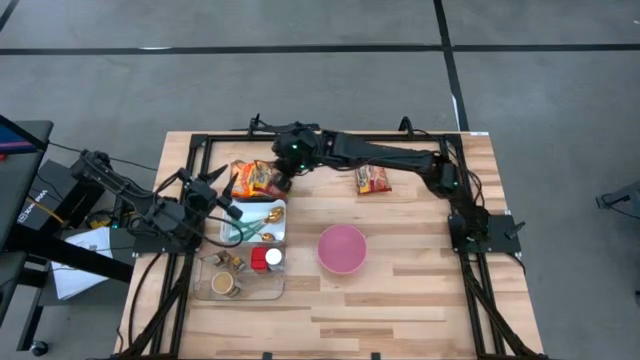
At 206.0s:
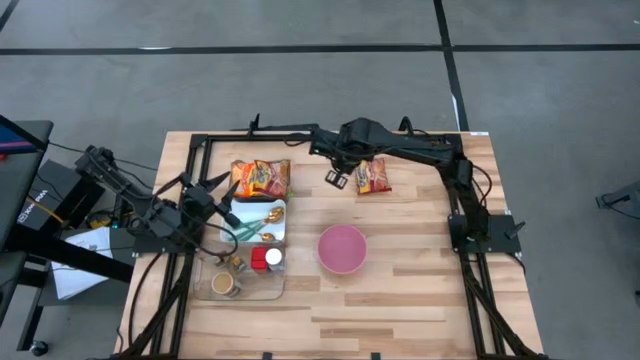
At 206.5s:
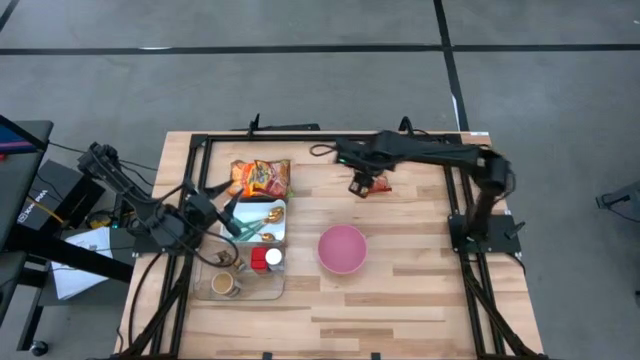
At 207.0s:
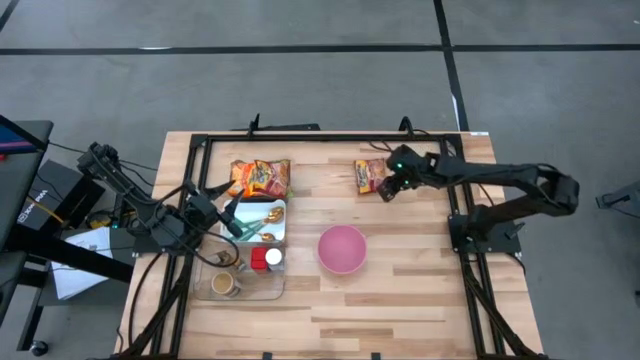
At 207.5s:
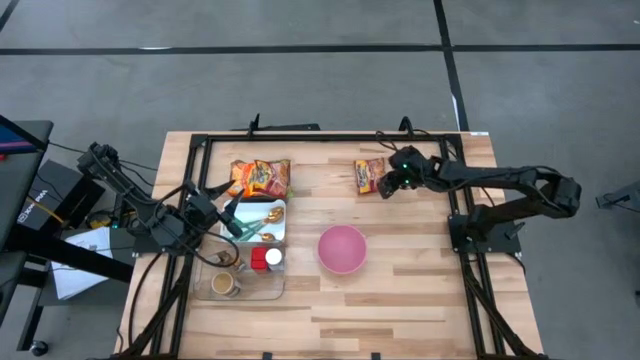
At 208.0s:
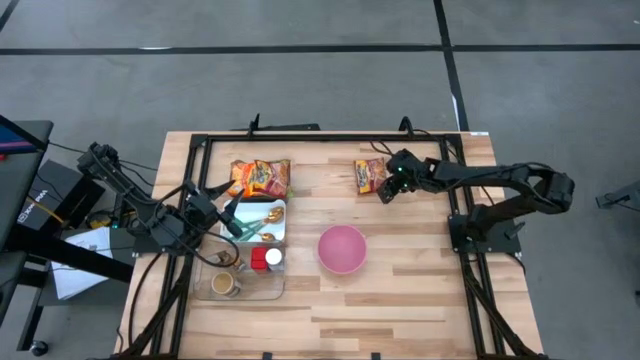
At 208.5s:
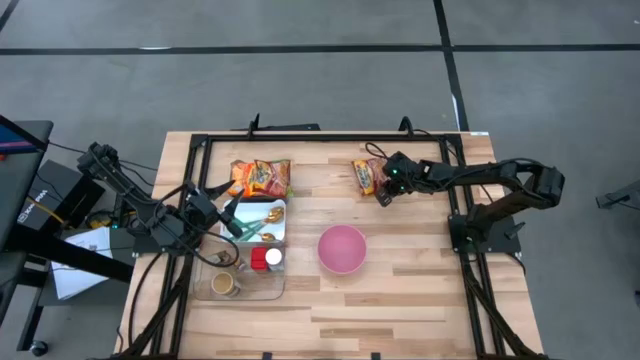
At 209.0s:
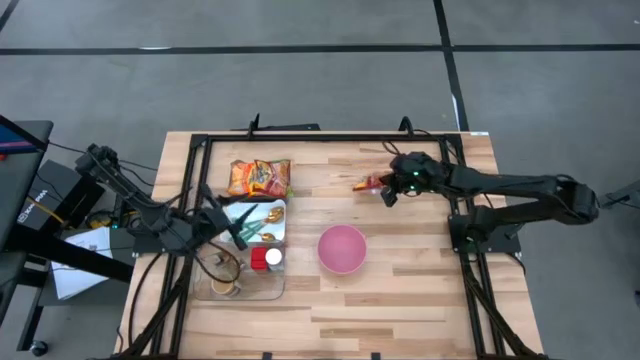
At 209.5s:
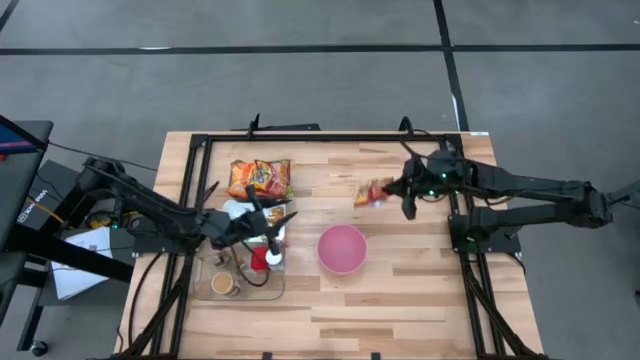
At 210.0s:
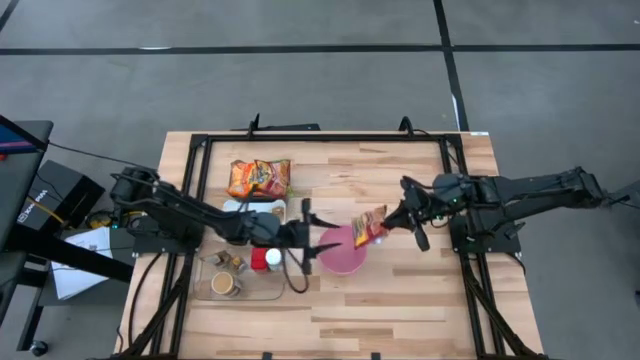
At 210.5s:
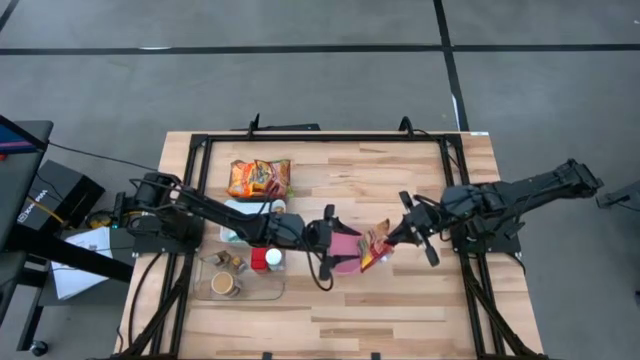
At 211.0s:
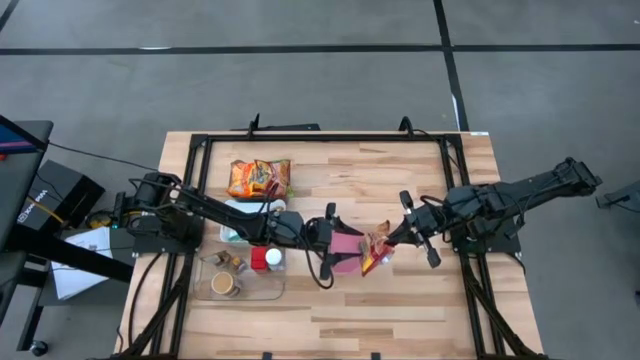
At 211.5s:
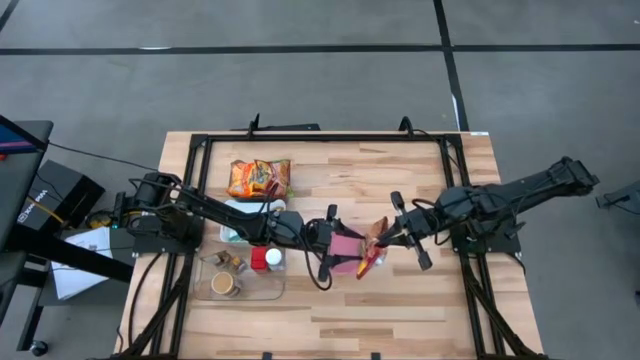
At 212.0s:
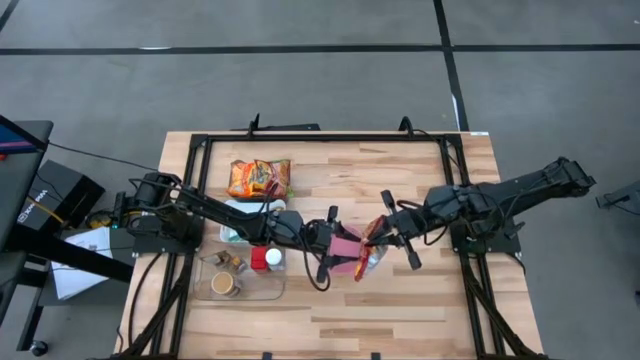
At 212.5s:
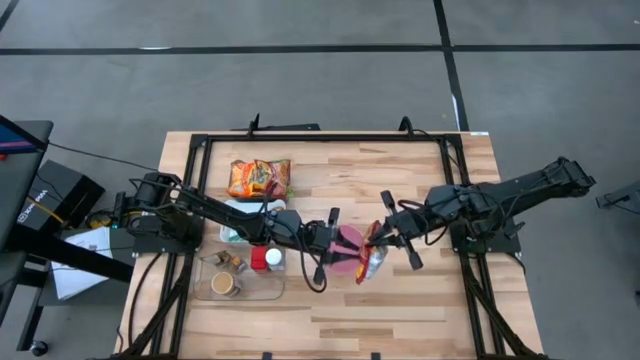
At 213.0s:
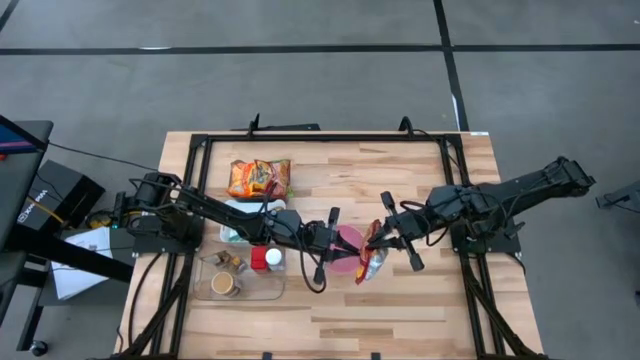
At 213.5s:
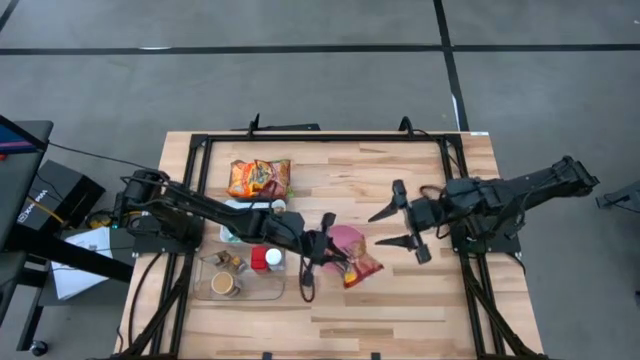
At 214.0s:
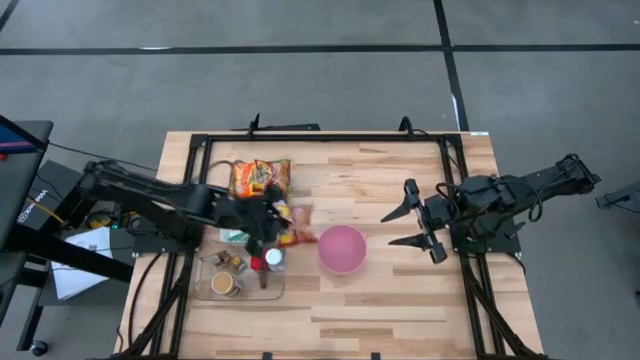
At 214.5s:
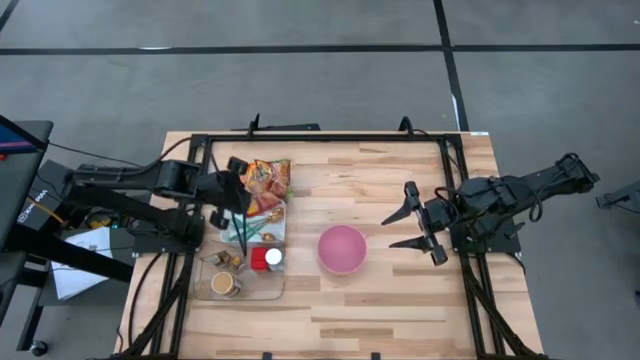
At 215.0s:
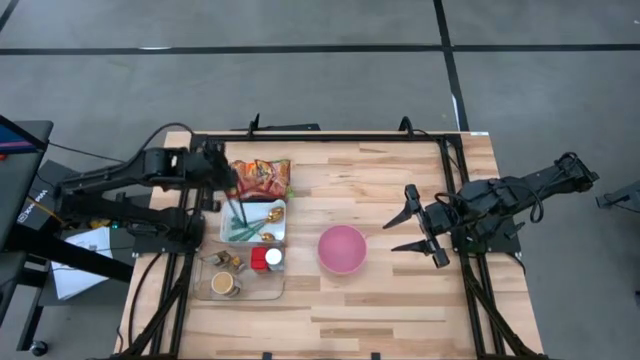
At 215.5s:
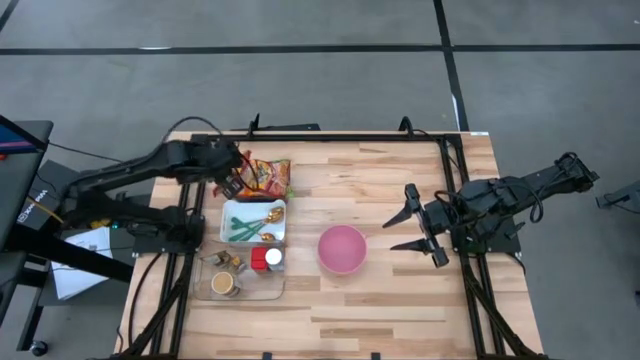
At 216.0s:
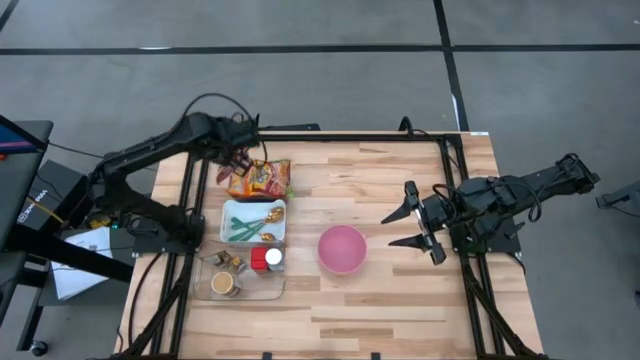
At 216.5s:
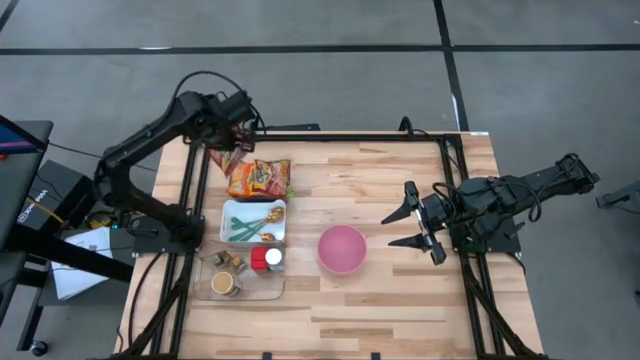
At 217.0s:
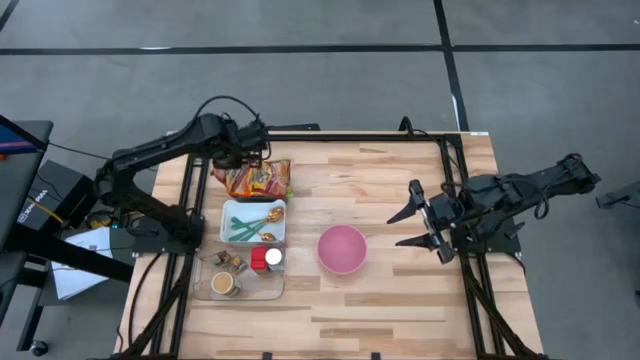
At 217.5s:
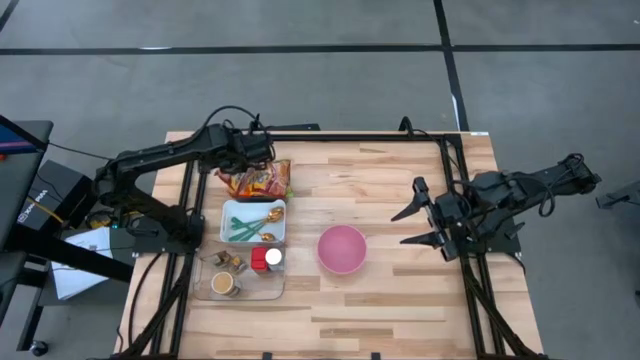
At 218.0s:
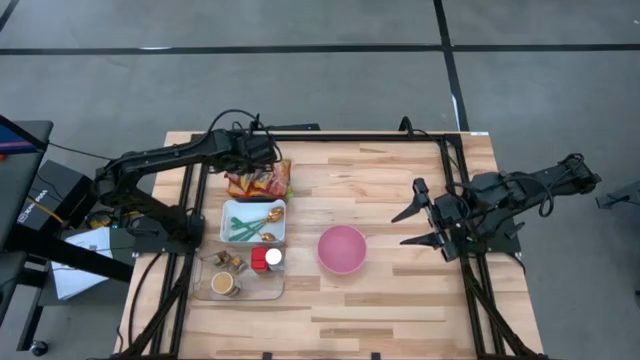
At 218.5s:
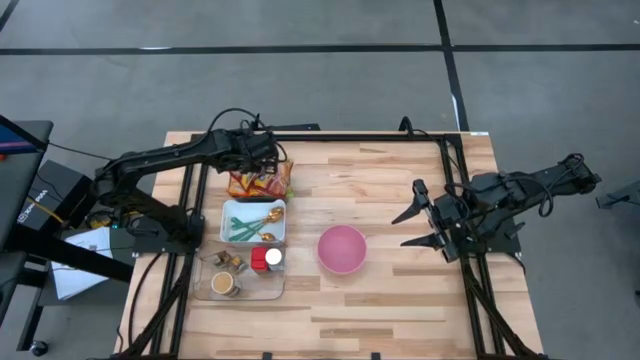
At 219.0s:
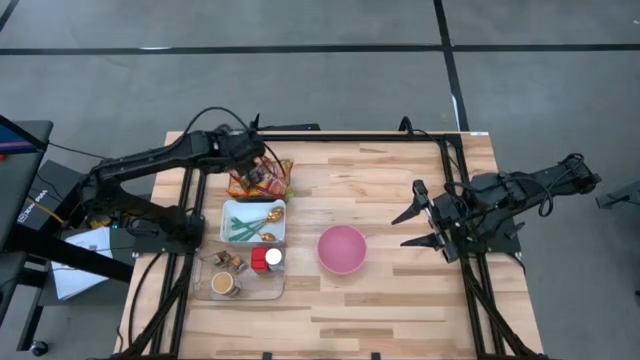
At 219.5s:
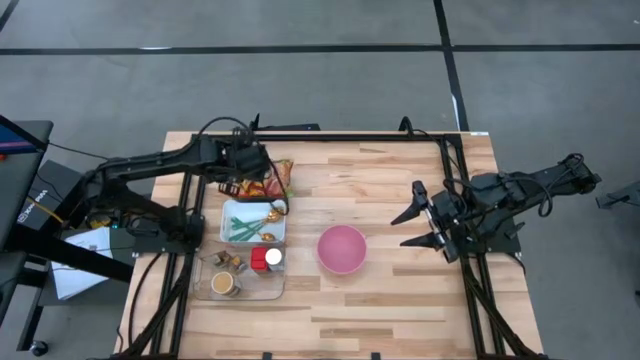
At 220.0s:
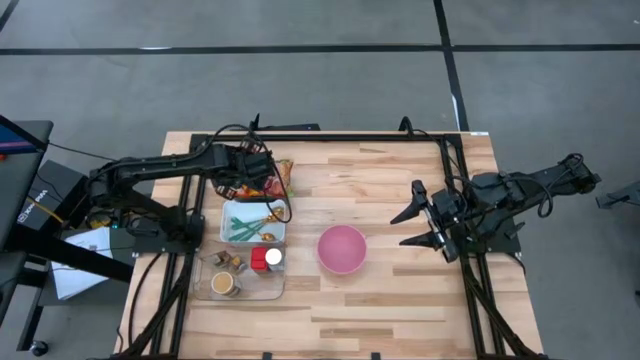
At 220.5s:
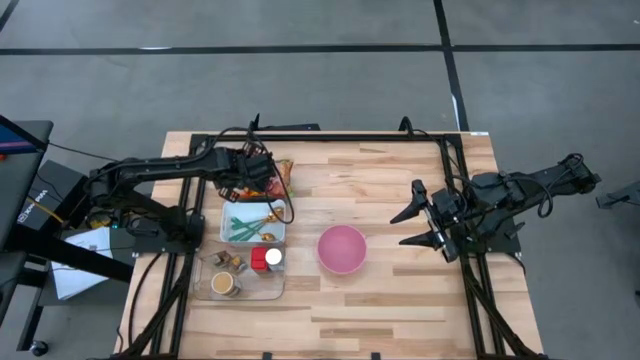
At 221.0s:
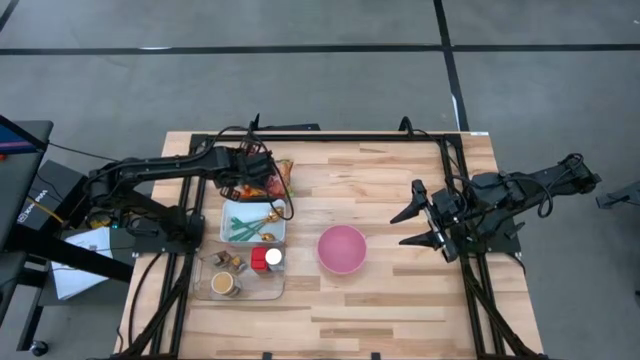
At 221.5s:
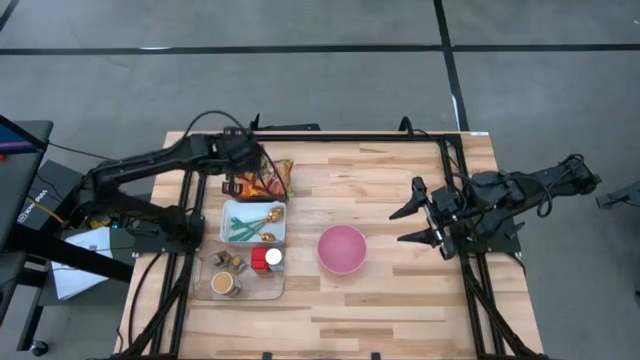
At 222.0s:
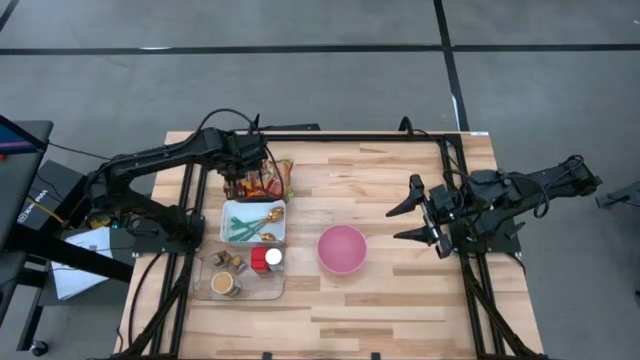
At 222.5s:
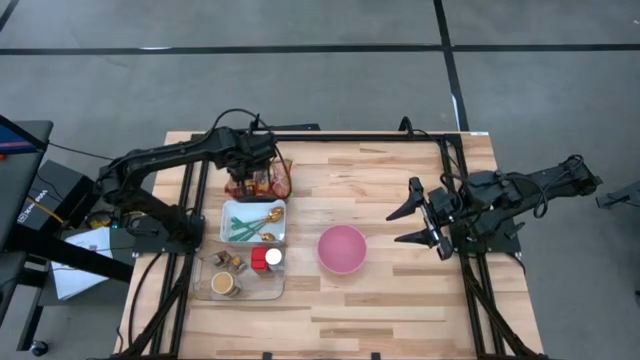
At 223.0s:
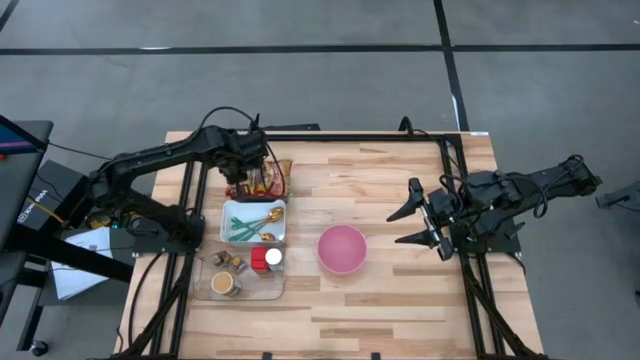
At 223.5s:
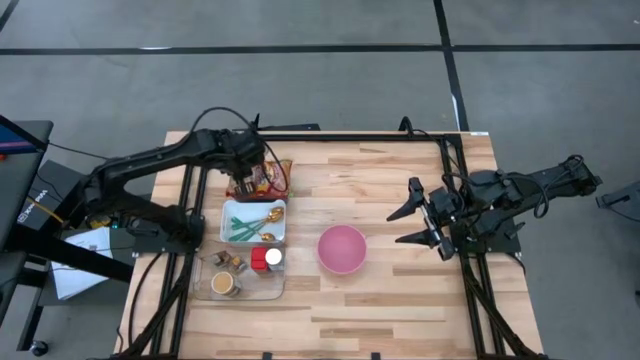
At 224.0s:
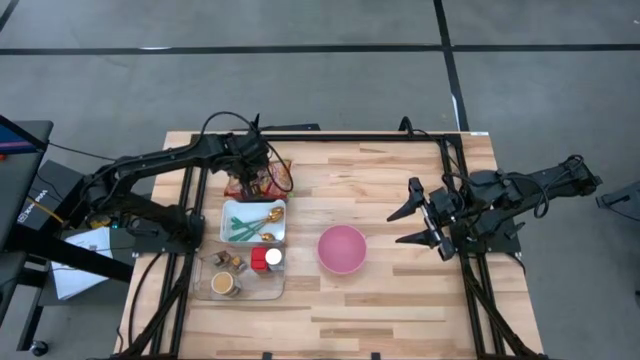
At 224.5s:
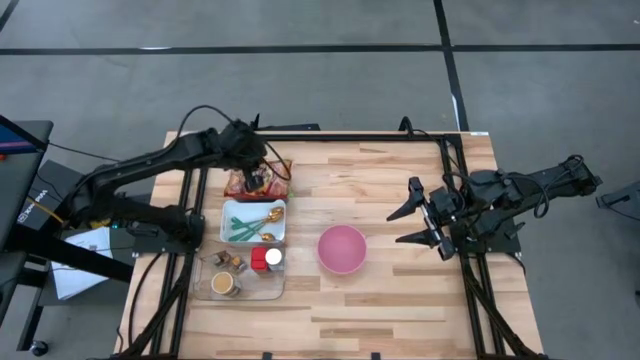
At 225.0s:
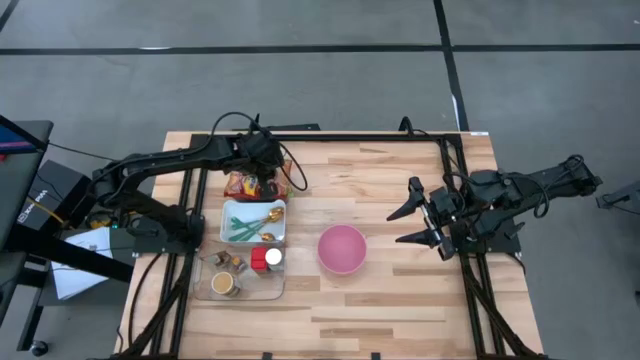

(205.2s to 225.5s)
Task: Pick & Place Food Item
Put the red noodle pack into the black transparent bin

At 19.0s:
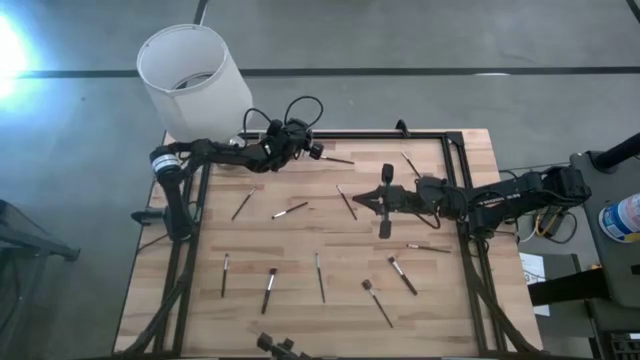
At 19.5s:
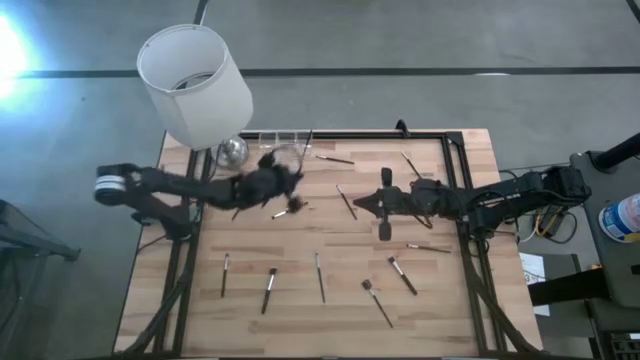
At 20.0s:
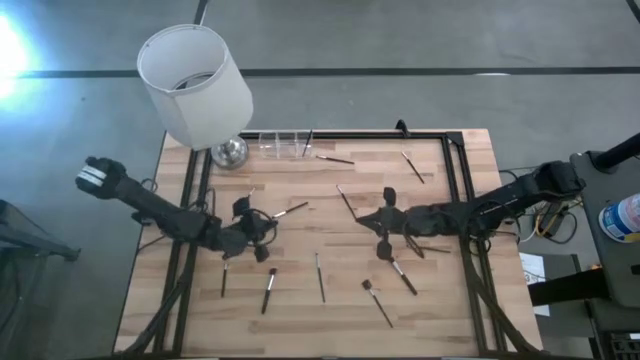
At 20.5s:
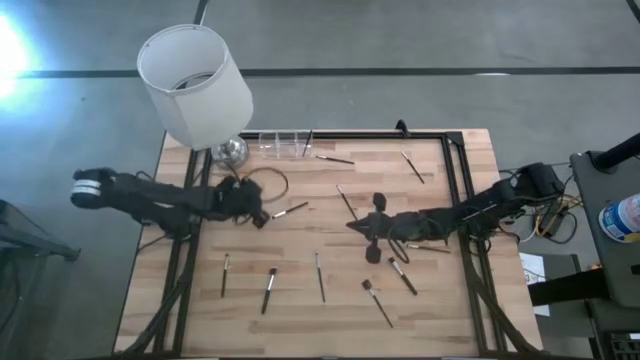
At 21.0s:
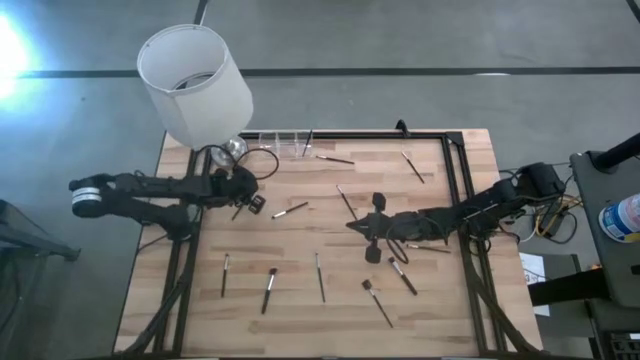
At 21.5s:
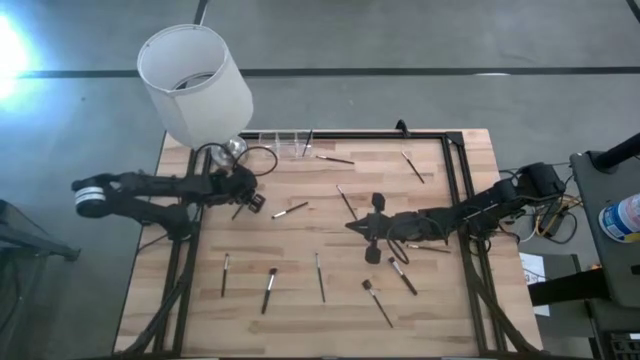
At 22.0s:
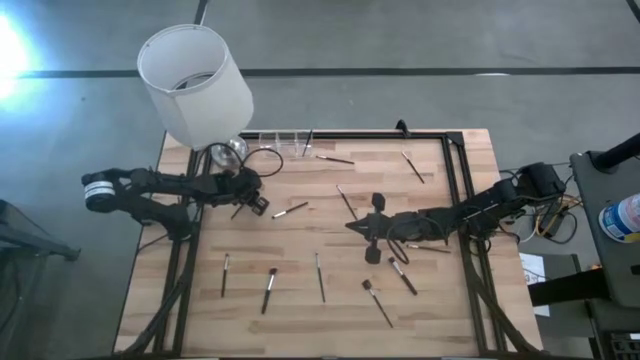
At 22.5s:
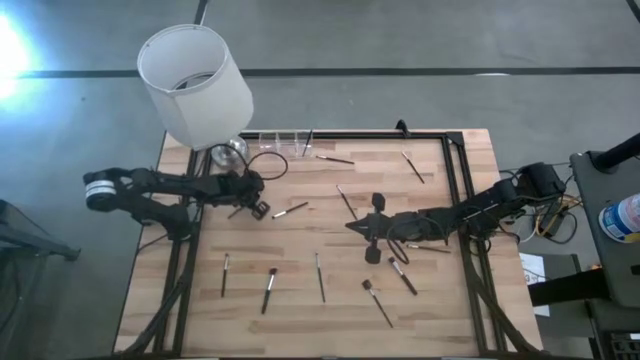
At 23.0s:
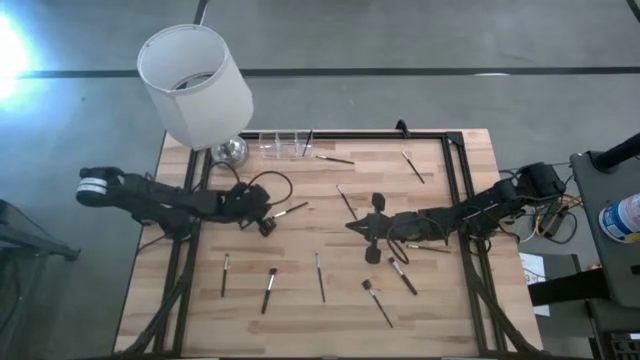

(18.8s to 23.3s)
Task: Put items in baskets/containers
Put the eyeshadow brush into the transparent organizer
